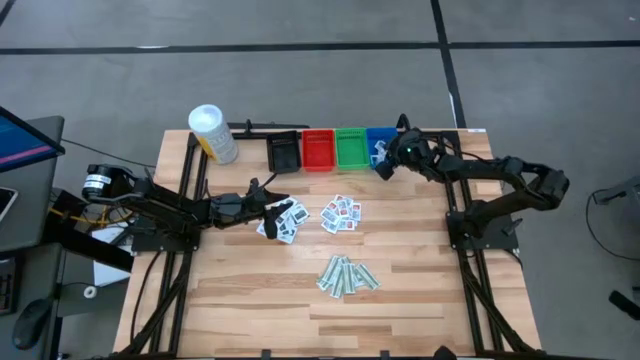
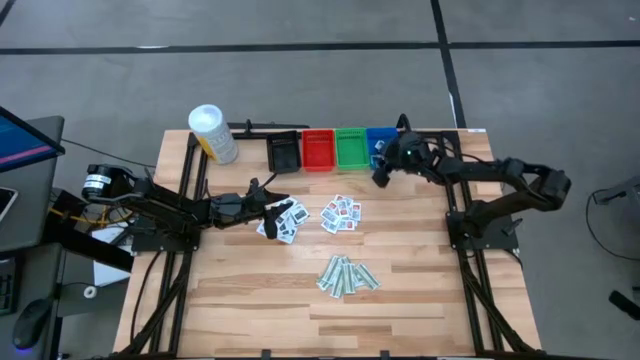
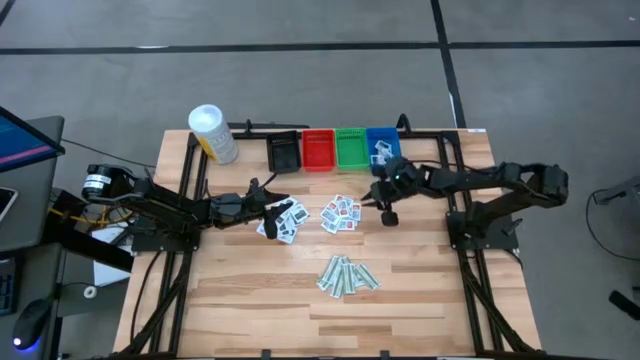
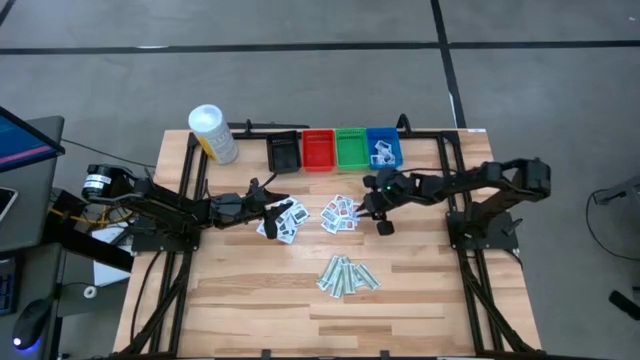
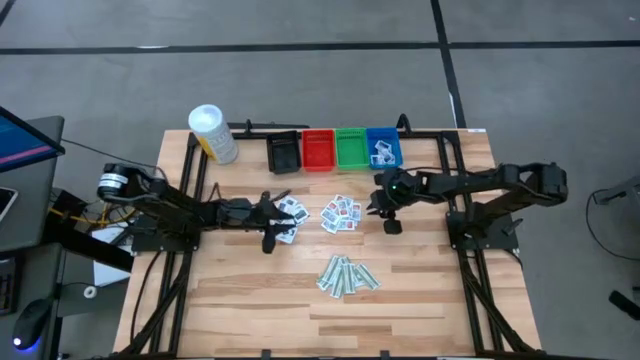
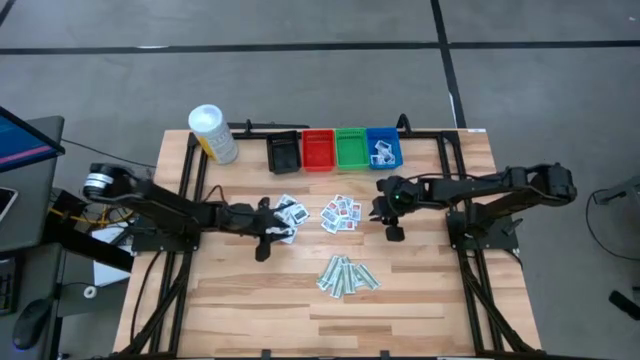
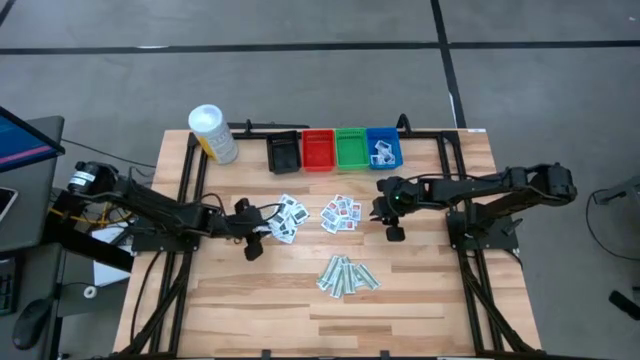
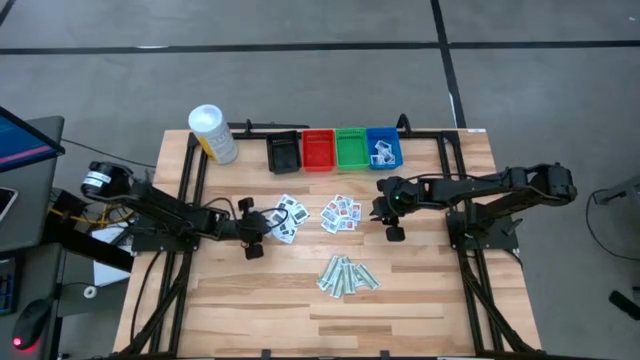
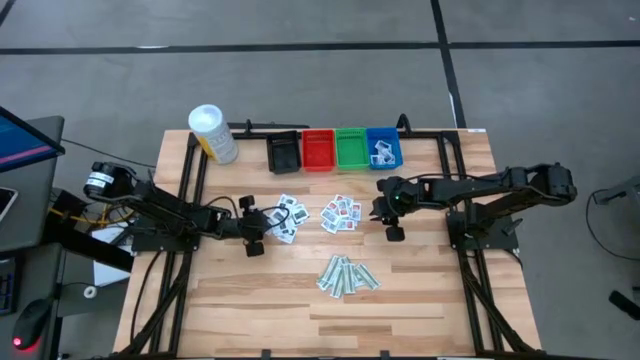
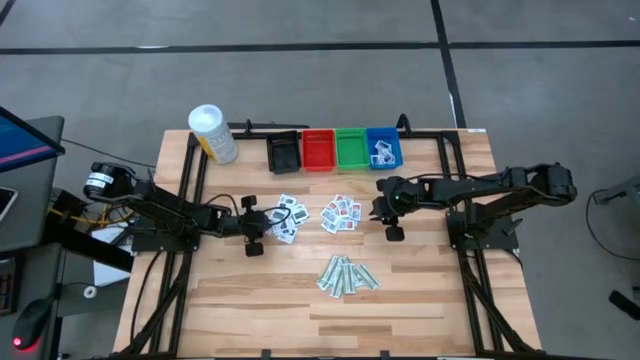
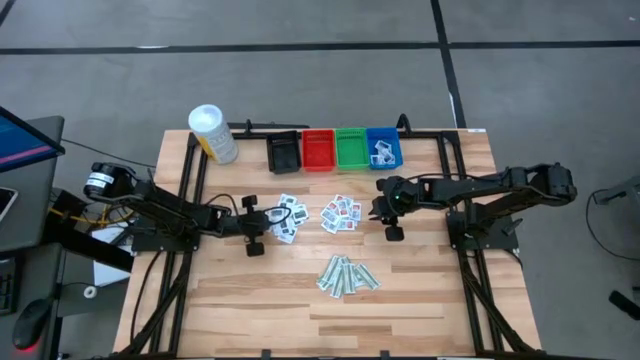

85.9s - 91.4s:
Task: Pick & Place First Aid Supplies
Put the blue alcohol pad into the blue bin

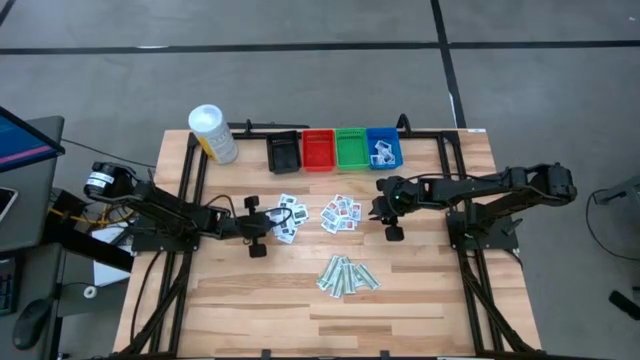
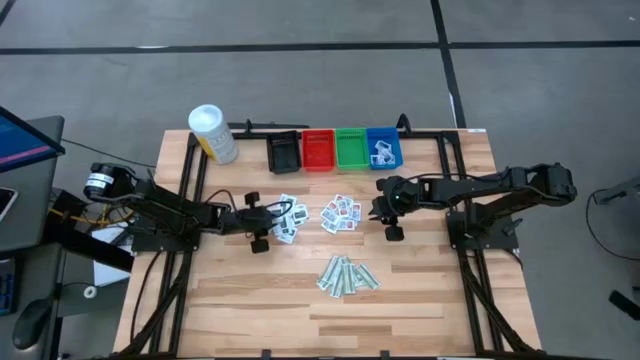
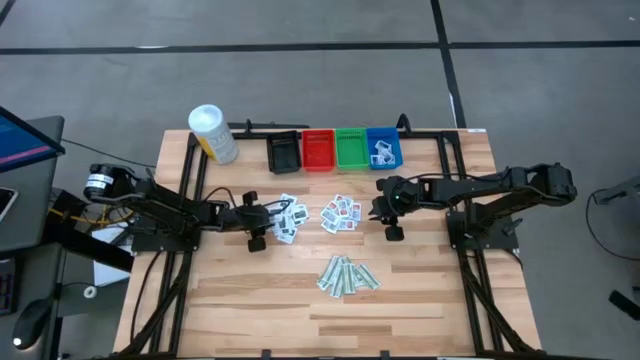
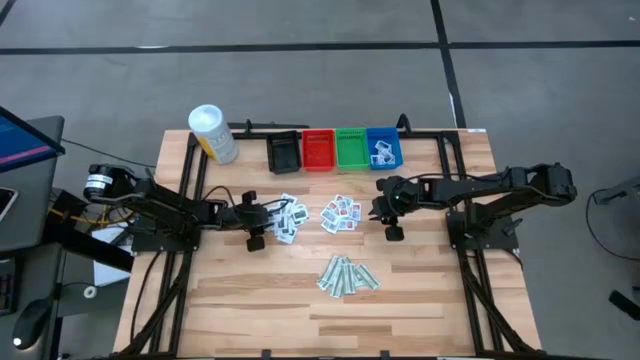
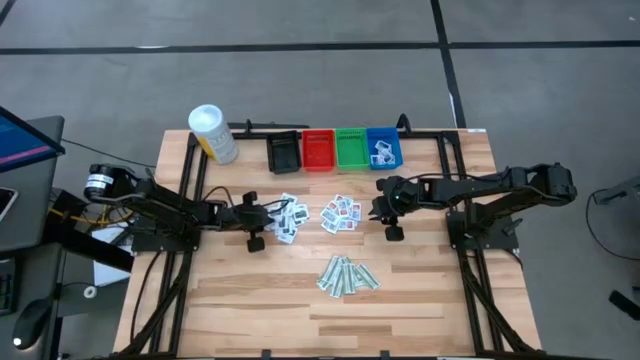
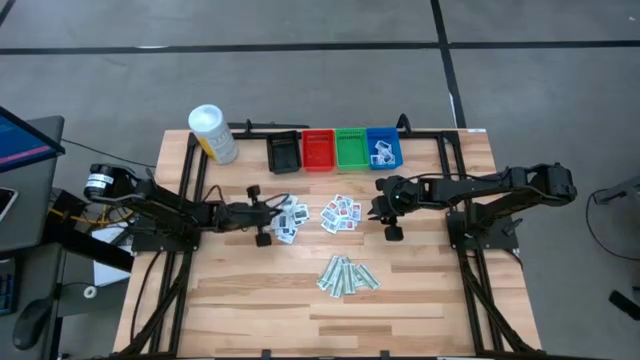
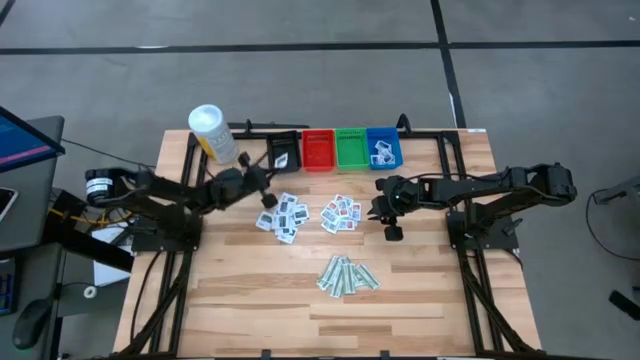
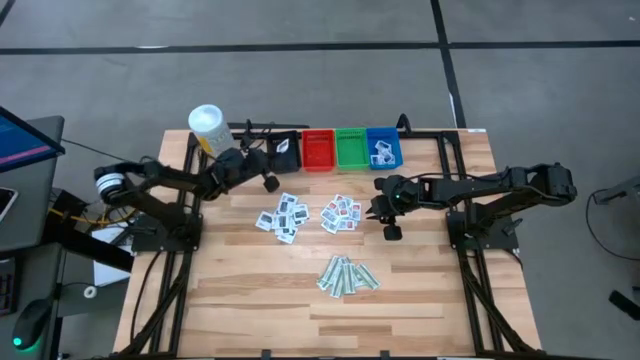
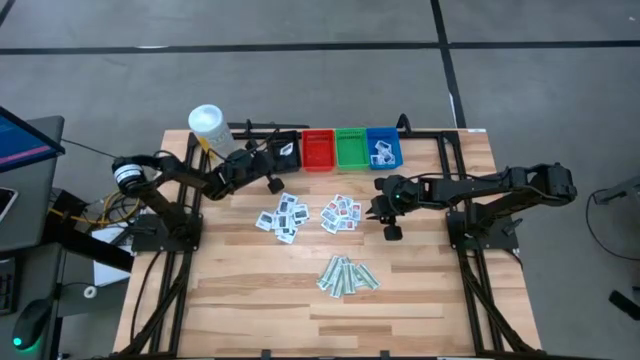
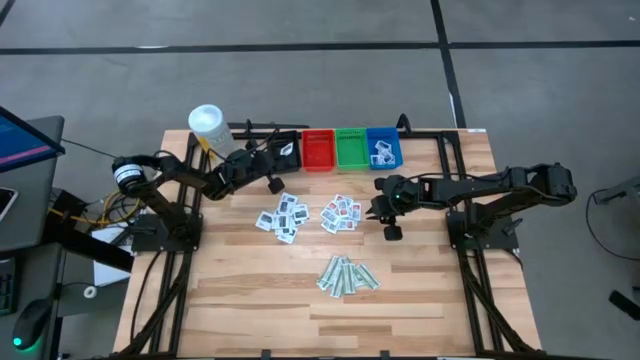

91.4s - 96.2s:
Put the black towelette pack into the black bin

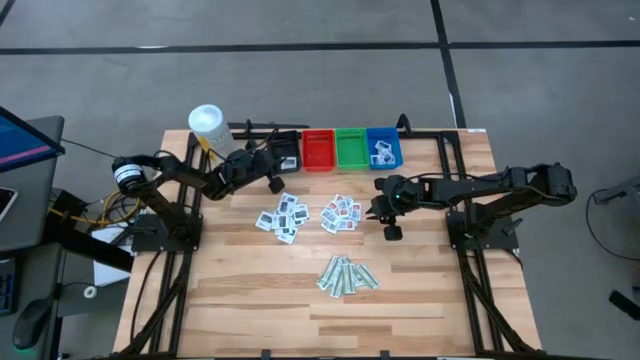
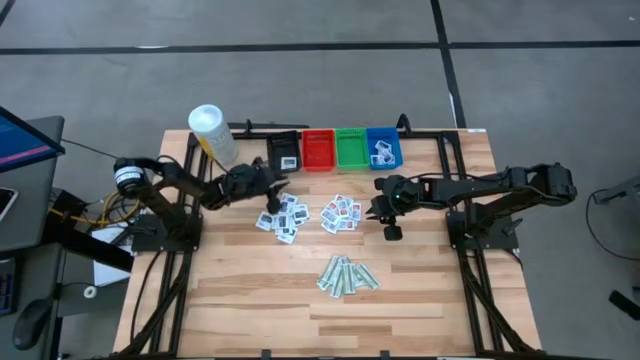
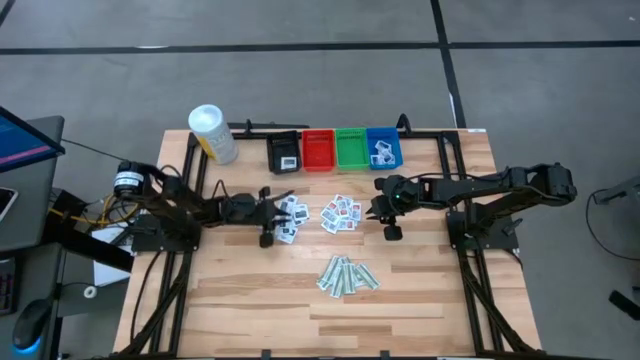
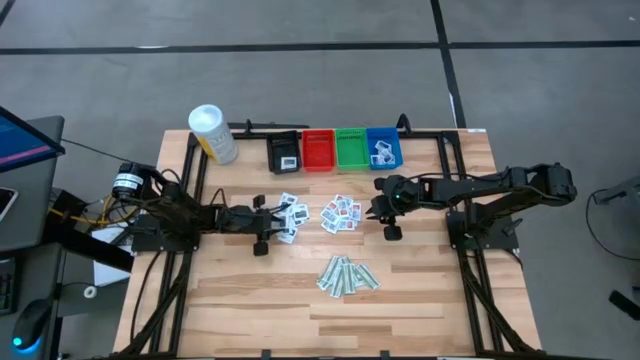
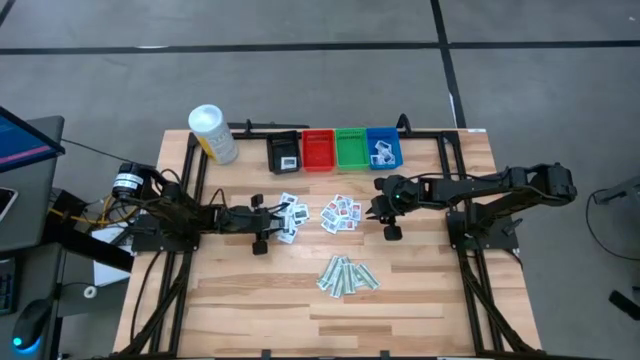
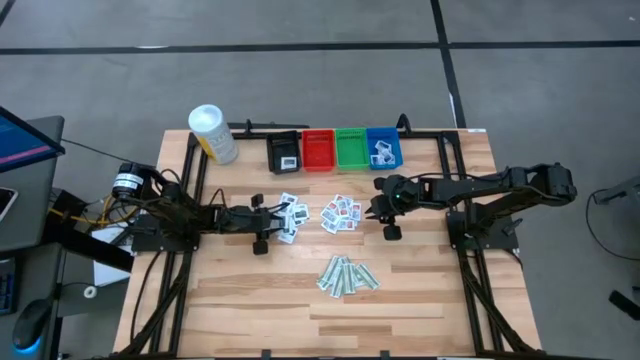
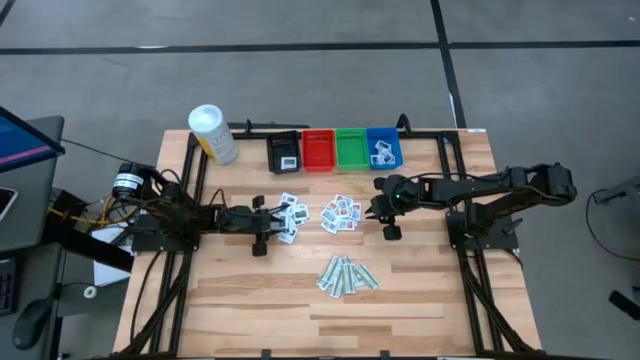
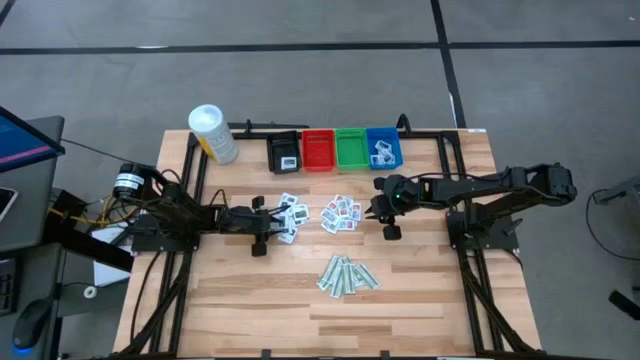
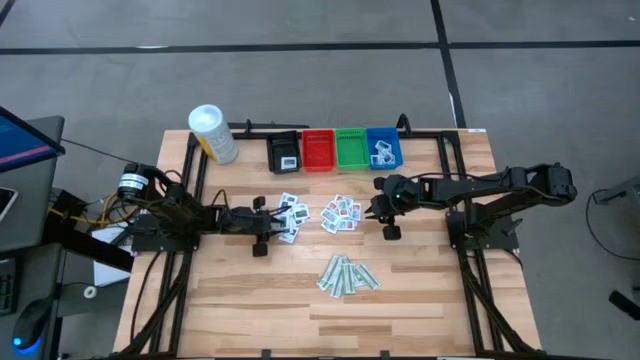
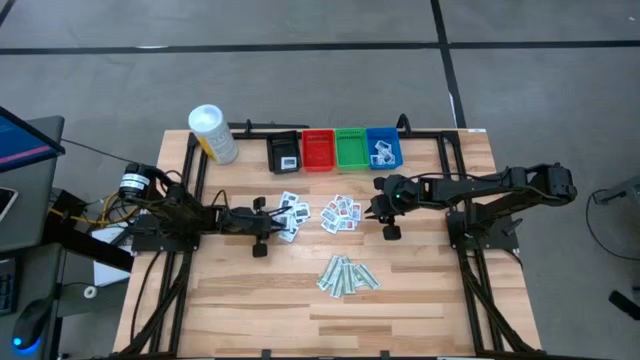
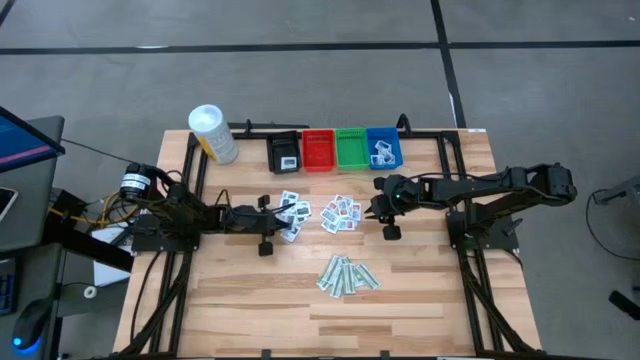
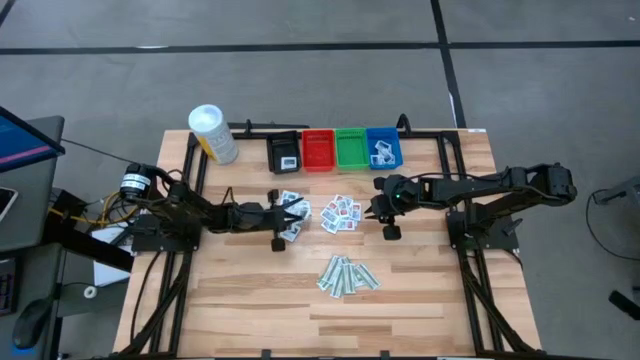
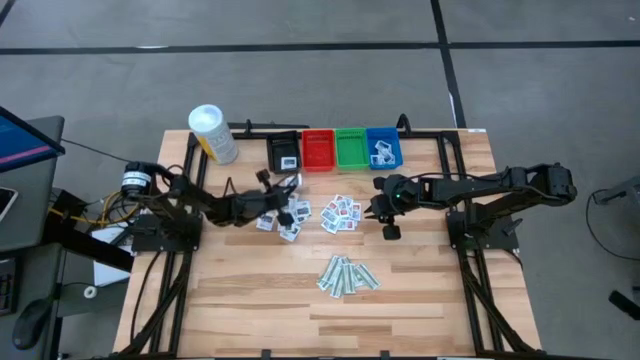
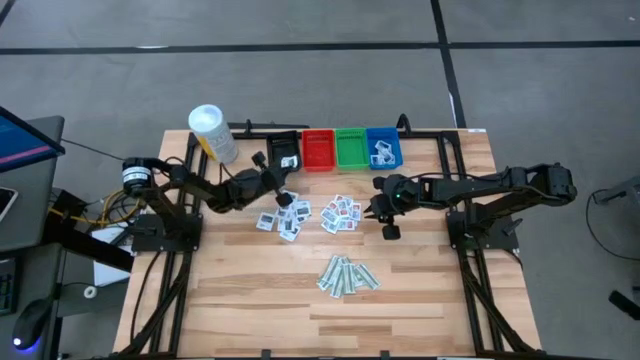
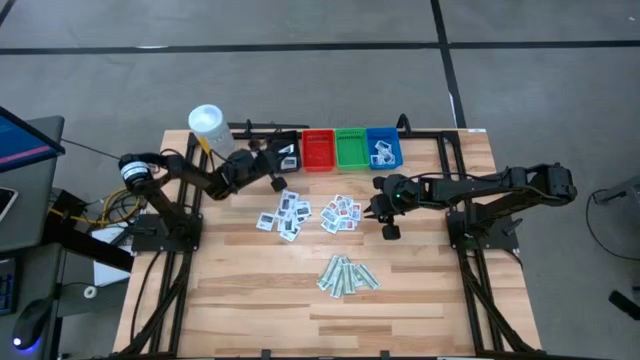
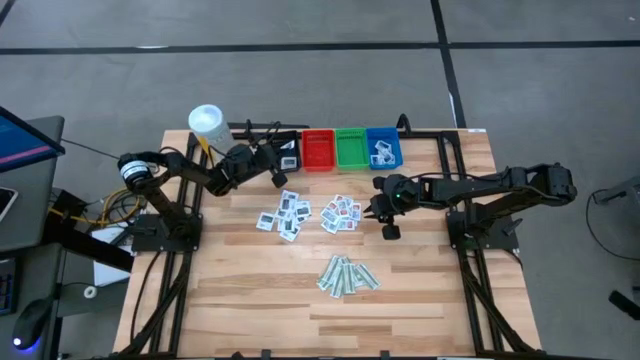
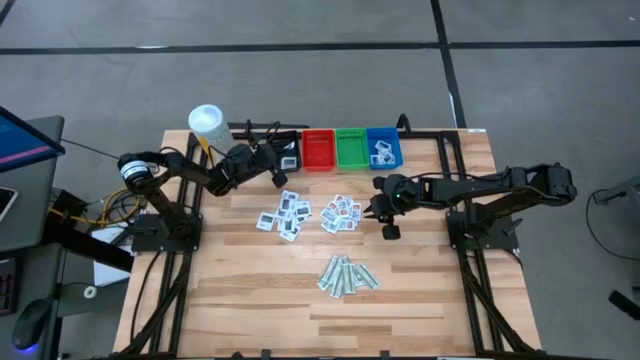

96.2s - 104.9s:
Put the black towelette pack into the black bin

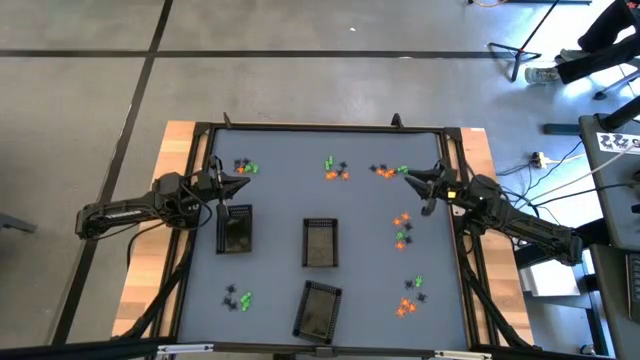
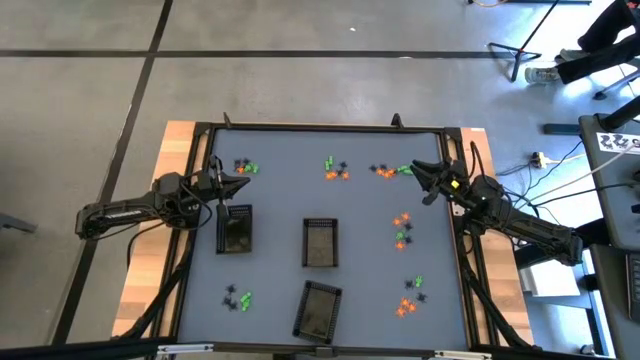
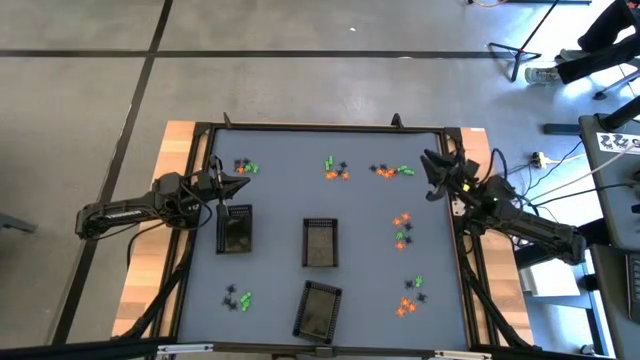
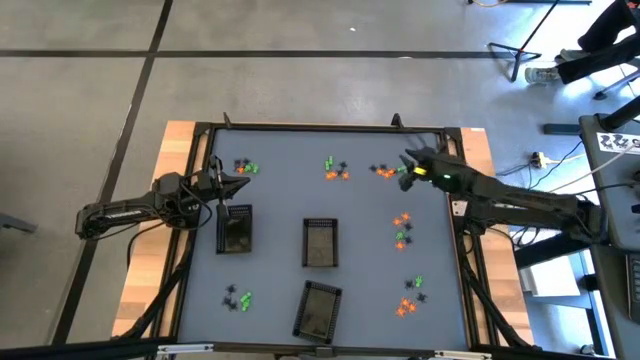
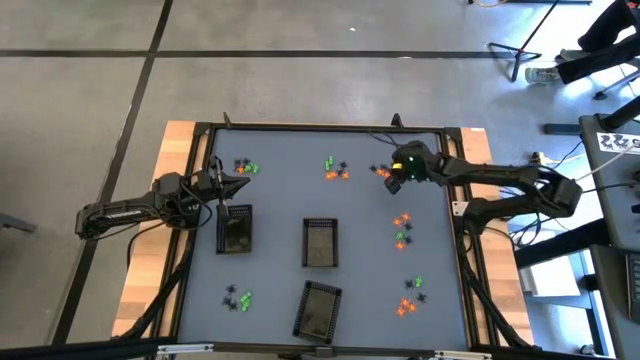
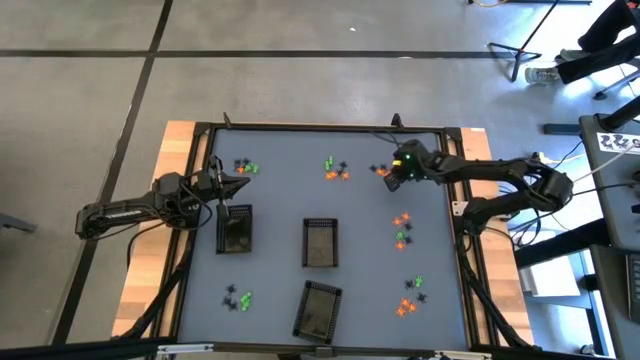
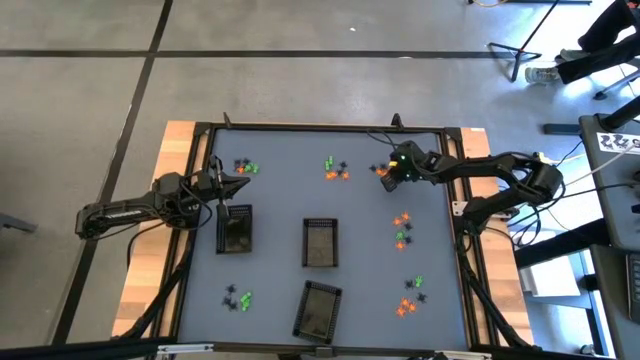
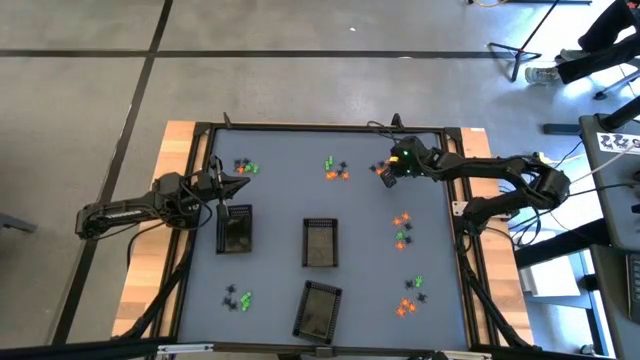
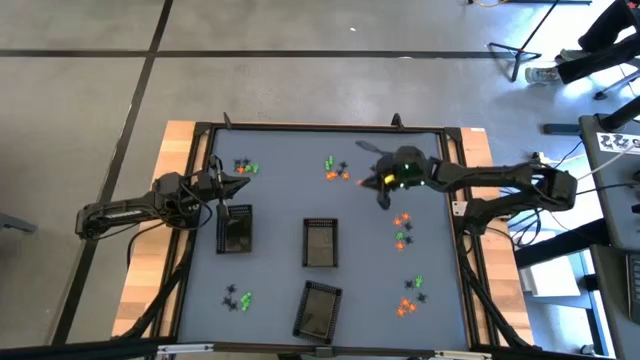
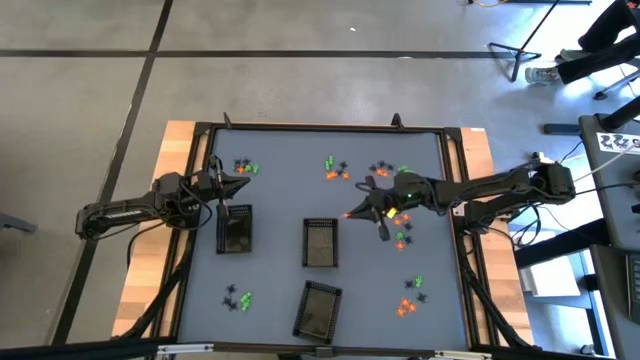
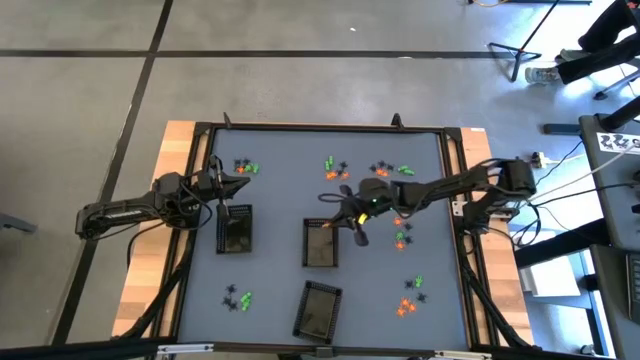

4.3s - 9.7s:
Task: Sort Halloween decoration
Put the orange spider toy into the top right black basket
